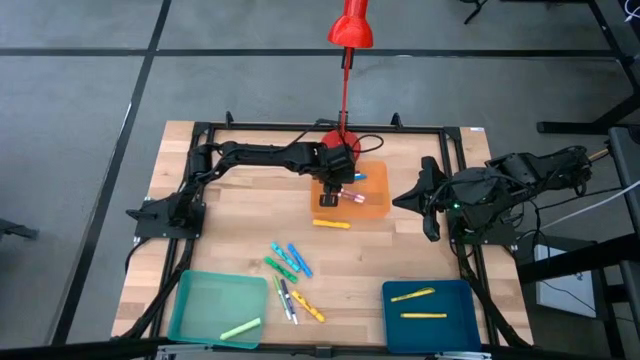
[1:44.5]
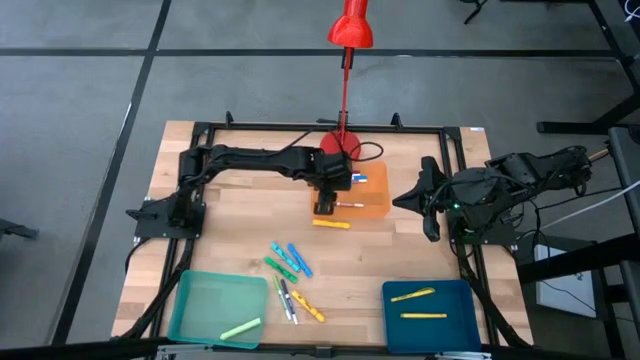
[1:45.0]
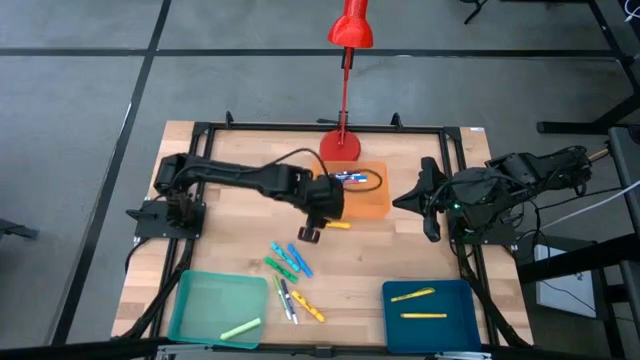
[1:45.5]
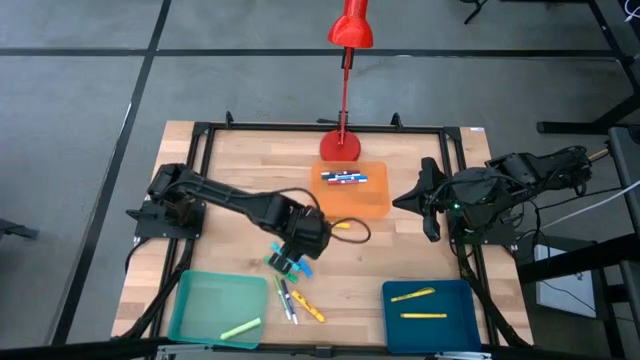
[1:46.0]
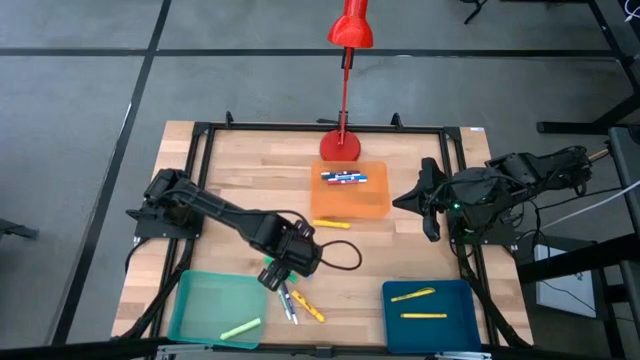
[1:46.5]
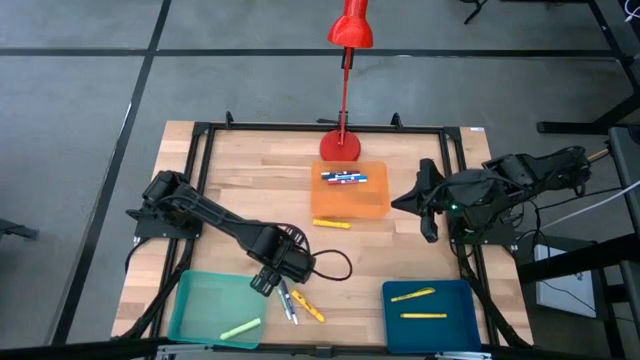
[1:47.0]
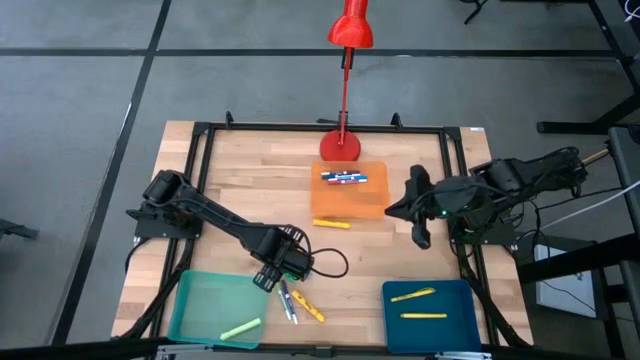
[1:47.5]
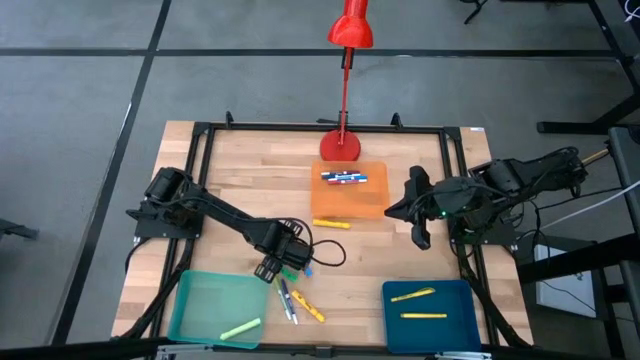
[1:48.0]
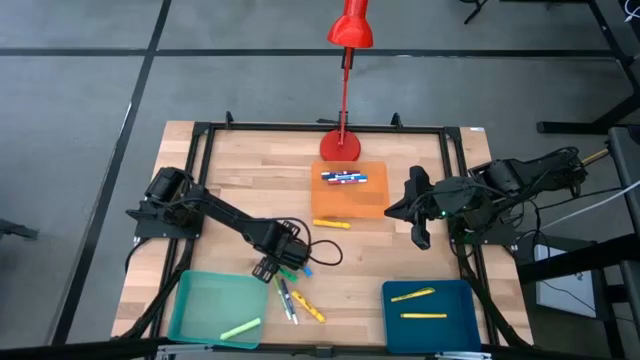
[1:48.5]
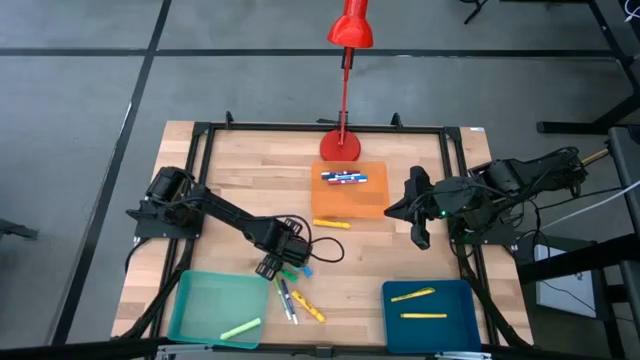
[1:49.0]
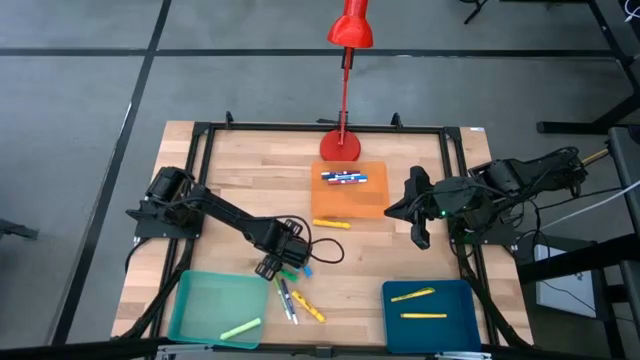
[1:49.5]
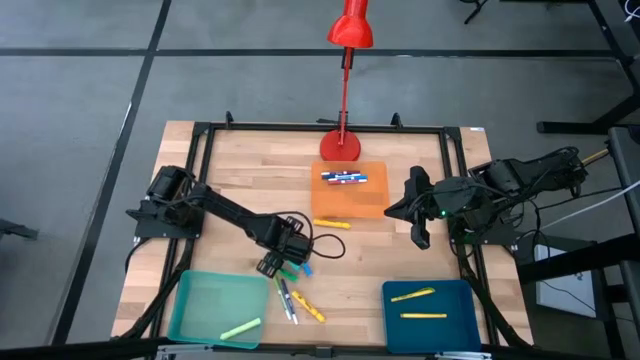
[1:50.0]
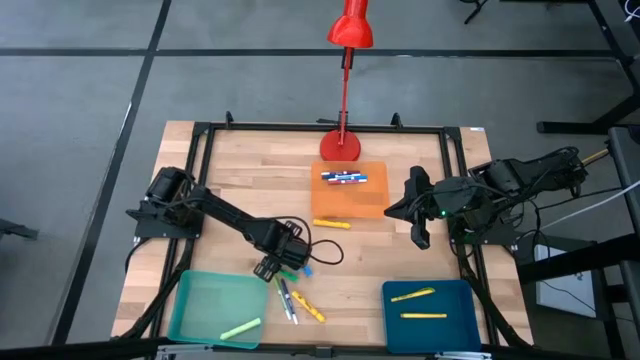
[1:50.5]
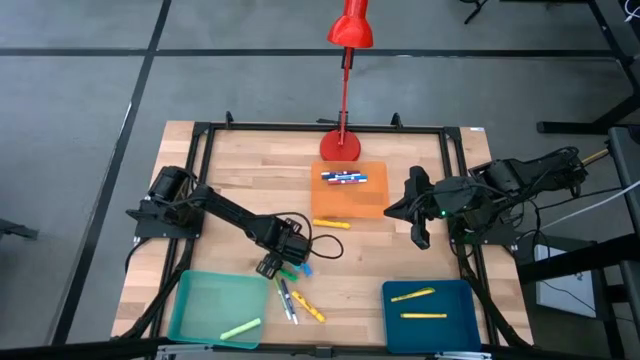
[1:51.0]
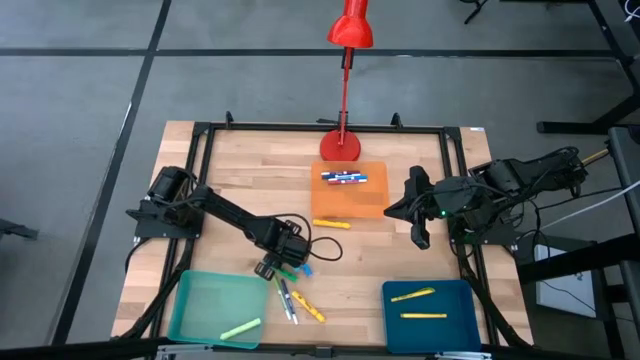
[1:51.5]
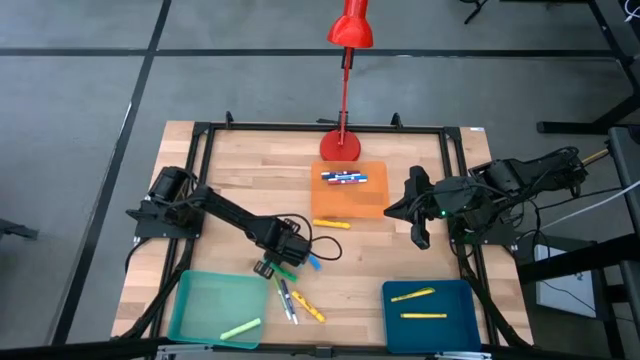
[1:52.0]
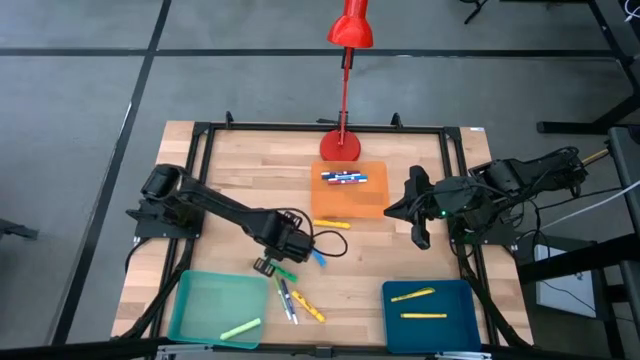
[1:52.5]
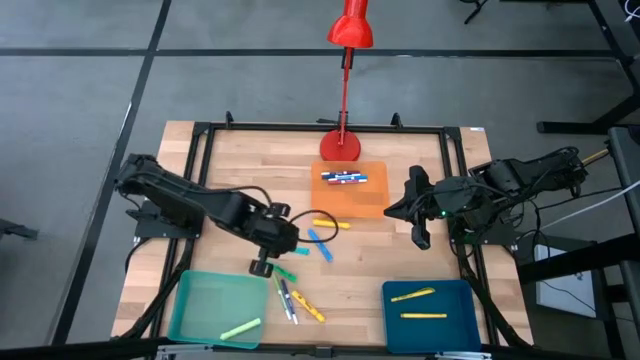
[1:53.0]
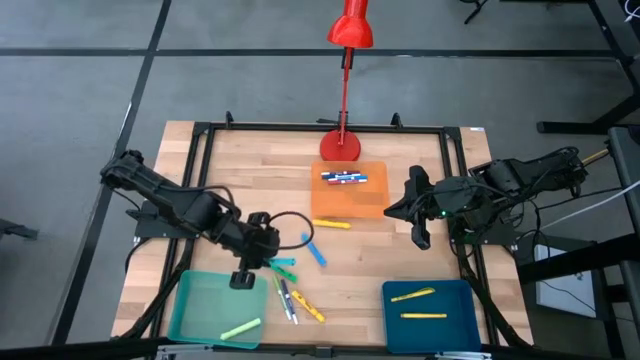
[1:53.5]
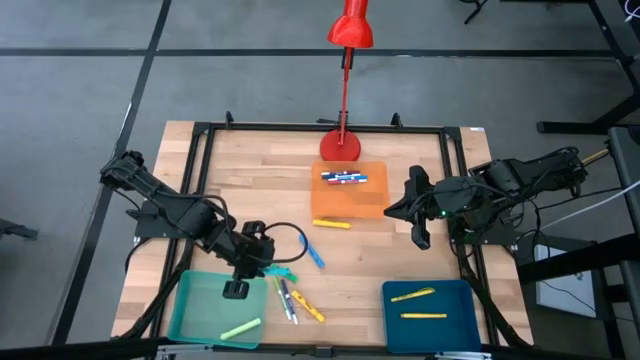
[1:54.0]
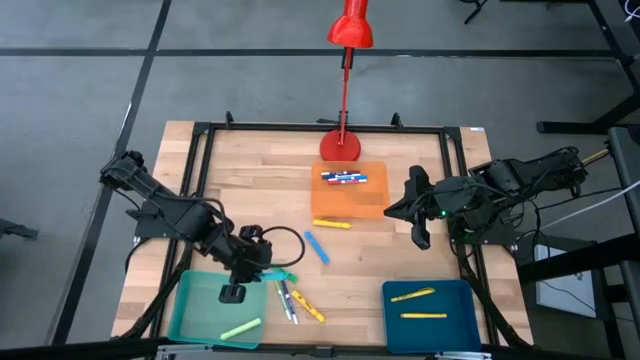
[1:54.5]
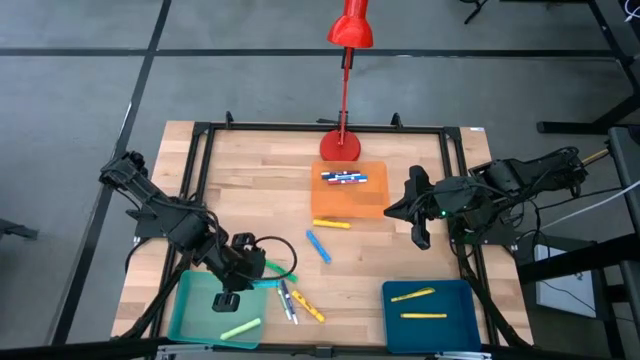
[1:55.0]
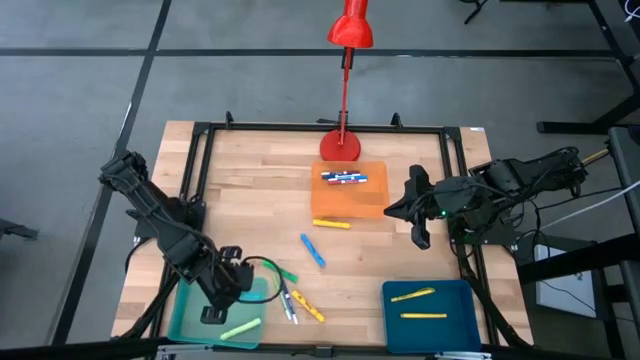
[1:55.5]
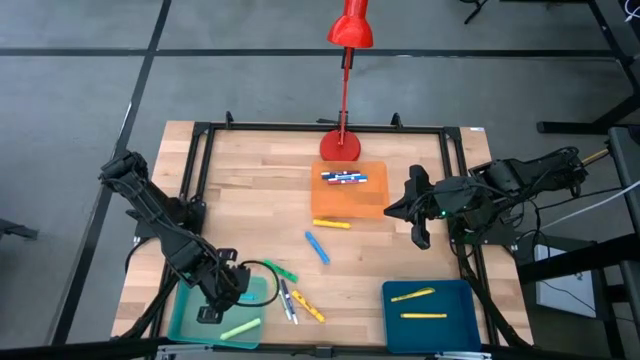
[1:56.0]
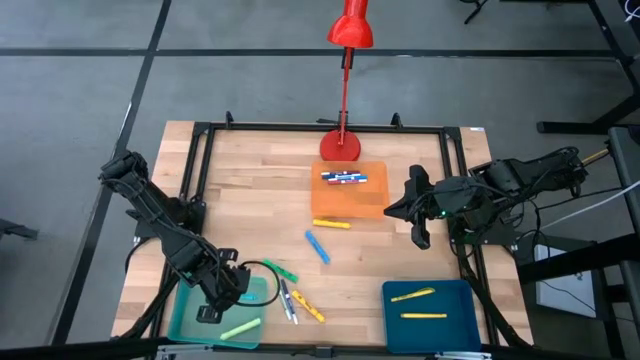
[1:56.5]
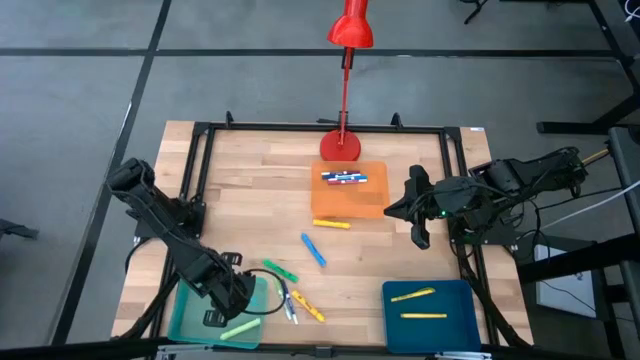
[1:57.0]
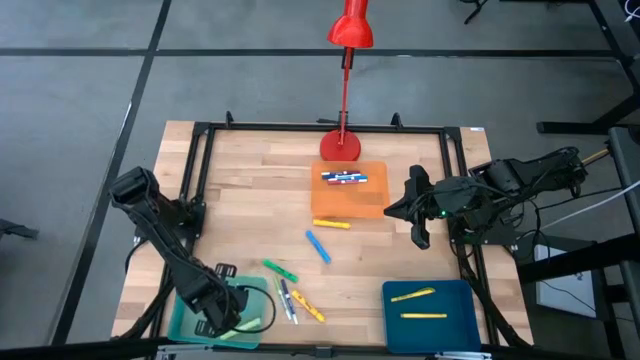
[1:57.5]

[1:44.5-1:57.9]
Task: Pick & Place Markers
Put the light blue highlighter pen into the green bin

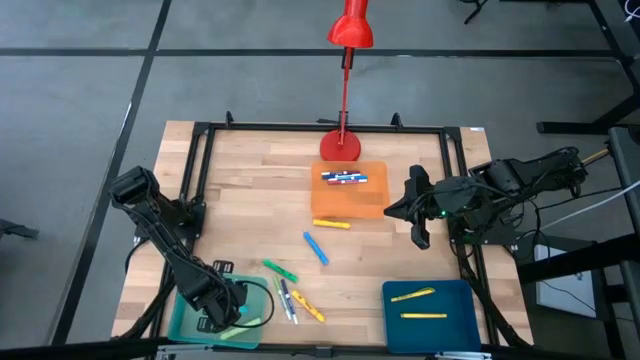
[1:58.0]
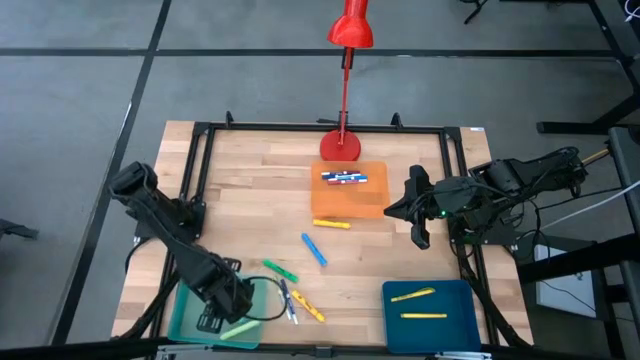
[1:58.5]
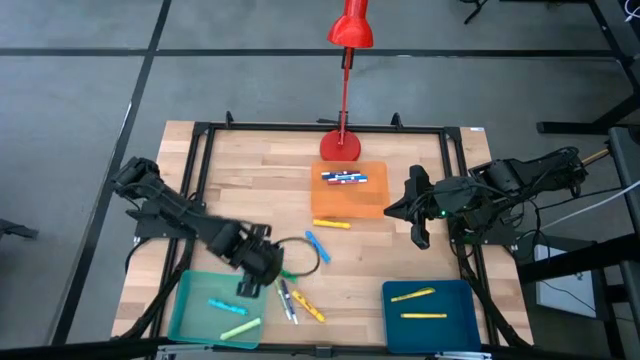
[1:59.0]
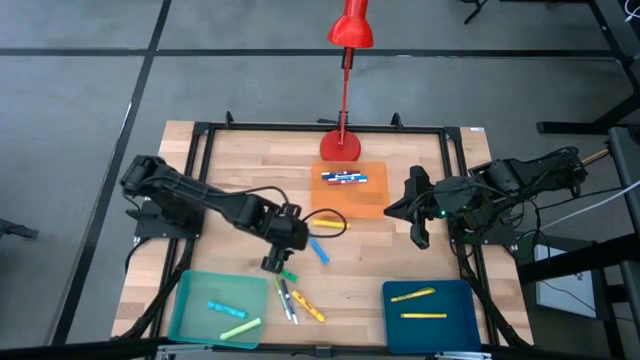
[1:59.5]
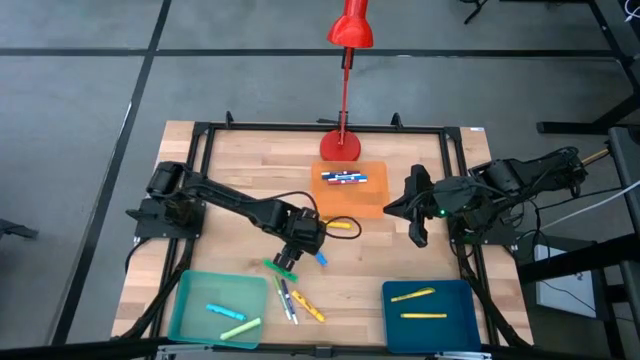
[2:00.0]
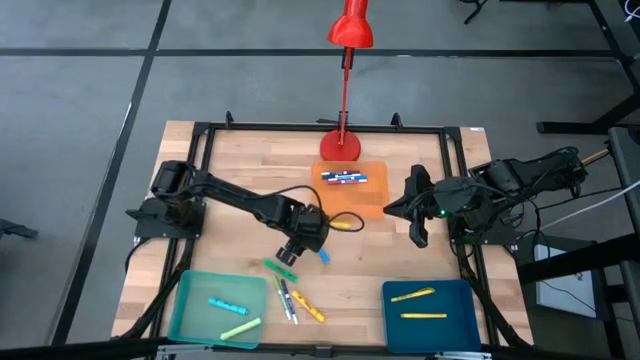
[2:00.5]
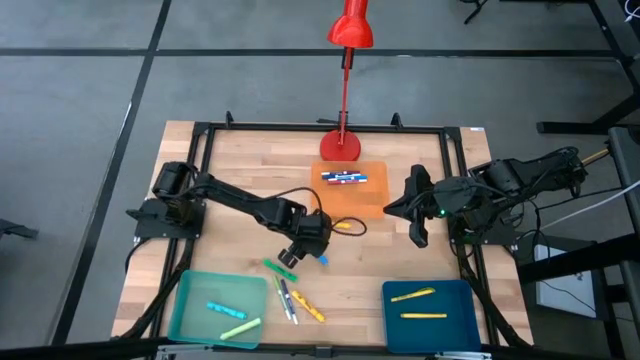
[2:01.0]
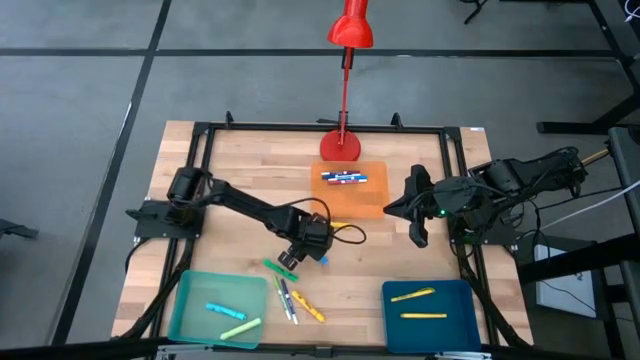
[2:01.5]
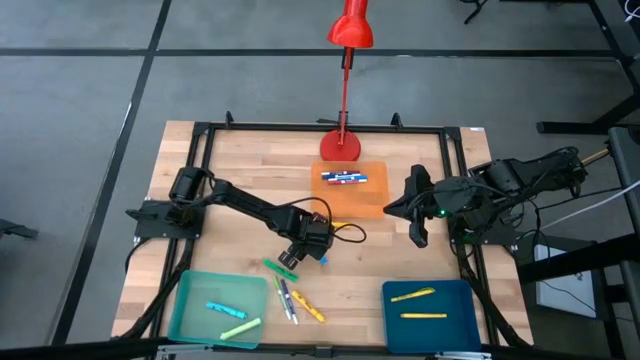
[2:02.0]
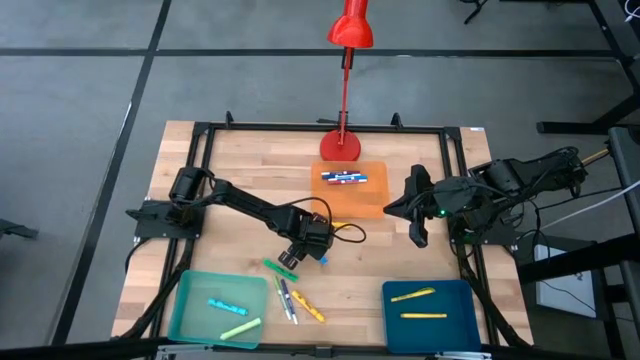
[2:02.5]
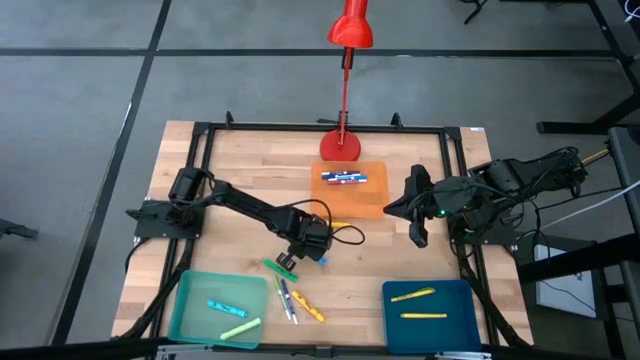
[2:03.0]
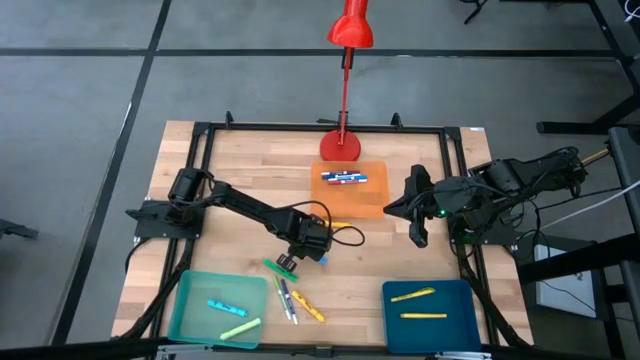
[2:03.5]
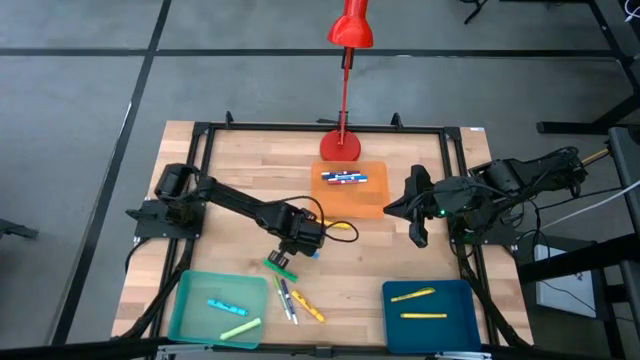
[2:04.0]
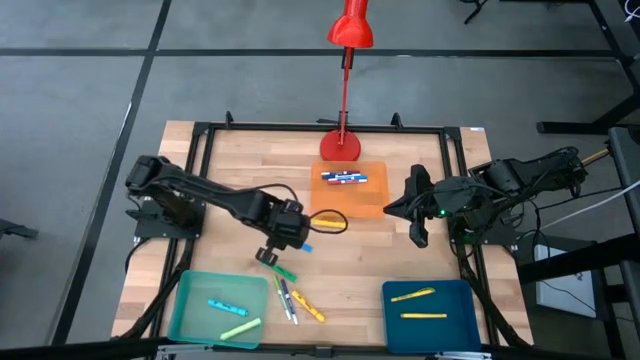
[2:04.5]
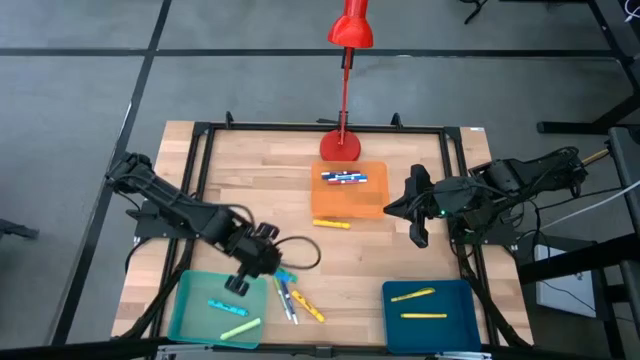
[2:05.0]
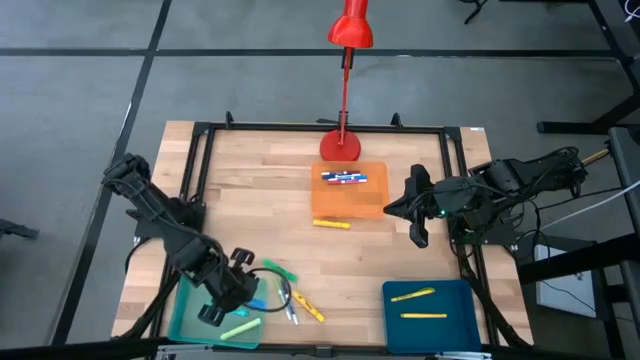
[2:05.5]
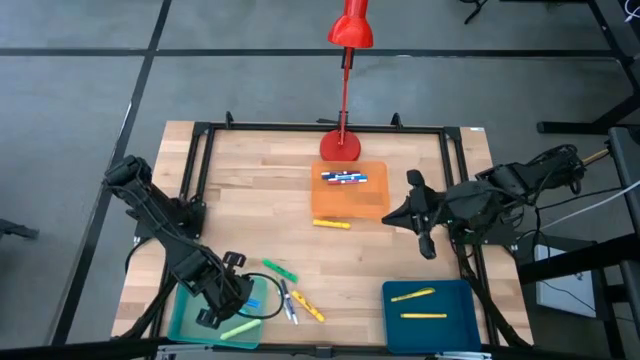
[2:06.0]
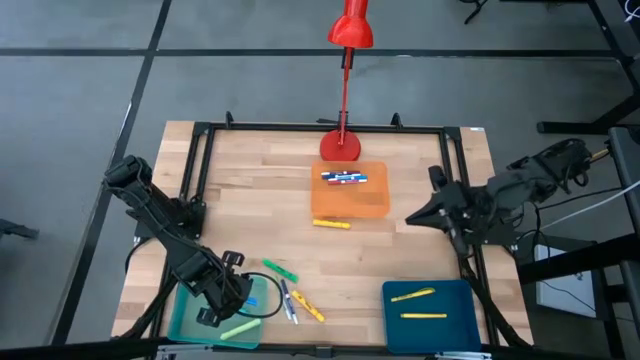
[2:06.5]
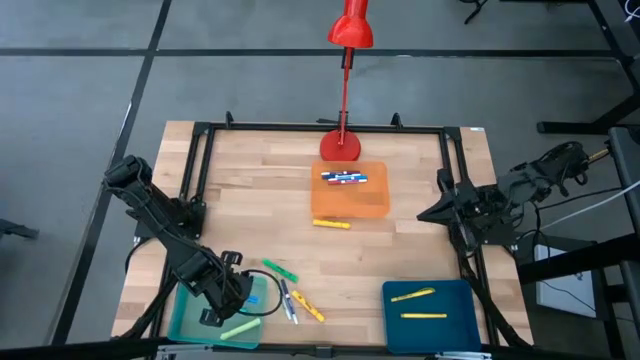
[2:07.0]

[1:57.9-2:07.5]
Put the blue highlighter pen into the green bin
